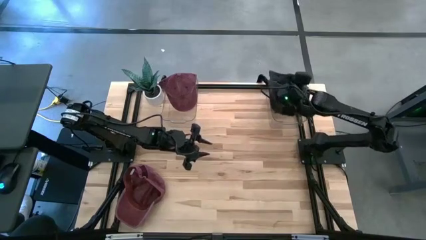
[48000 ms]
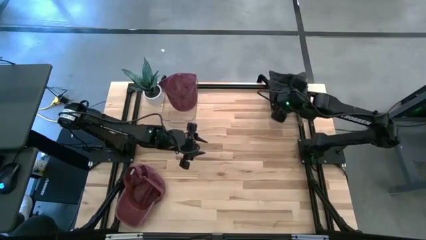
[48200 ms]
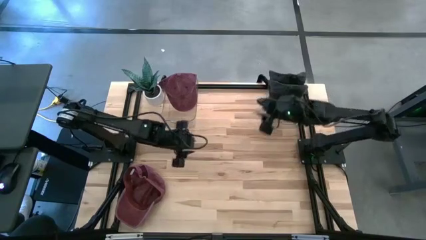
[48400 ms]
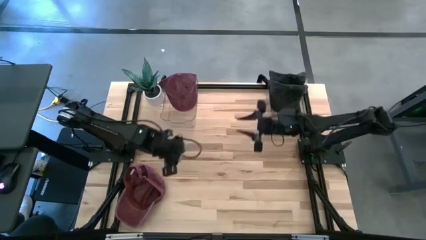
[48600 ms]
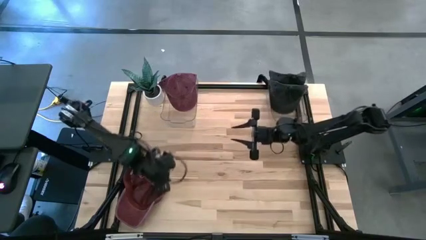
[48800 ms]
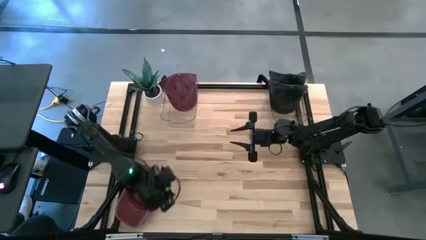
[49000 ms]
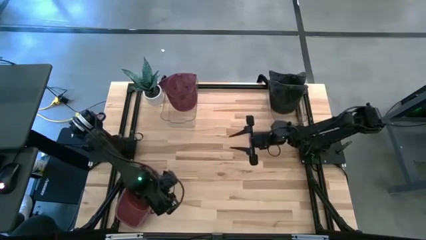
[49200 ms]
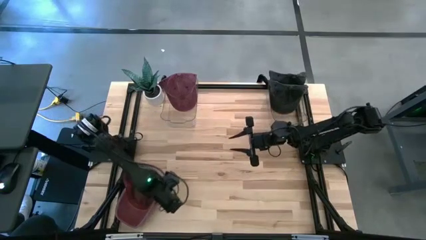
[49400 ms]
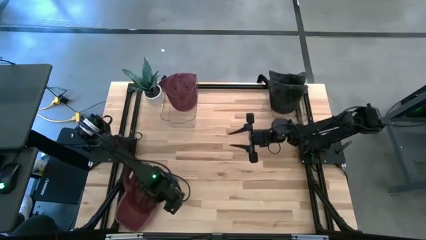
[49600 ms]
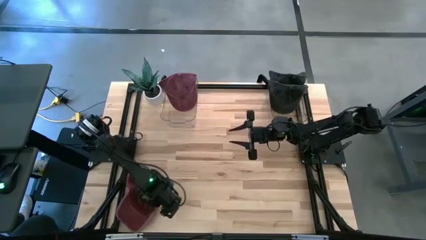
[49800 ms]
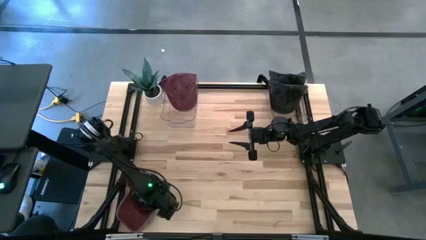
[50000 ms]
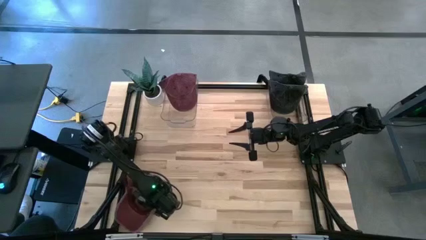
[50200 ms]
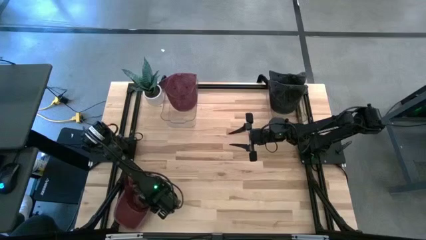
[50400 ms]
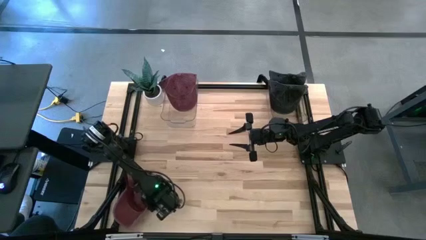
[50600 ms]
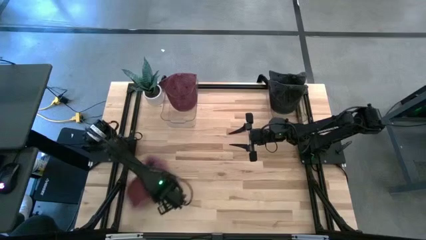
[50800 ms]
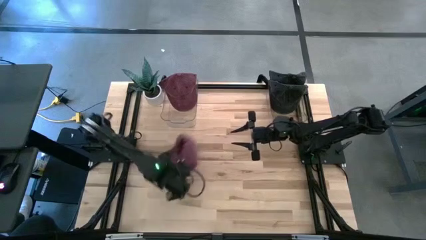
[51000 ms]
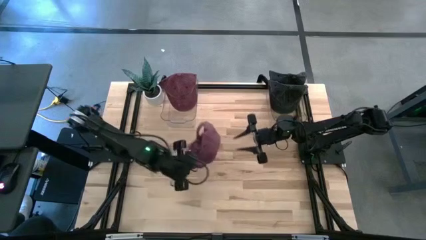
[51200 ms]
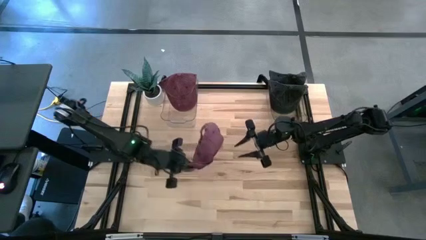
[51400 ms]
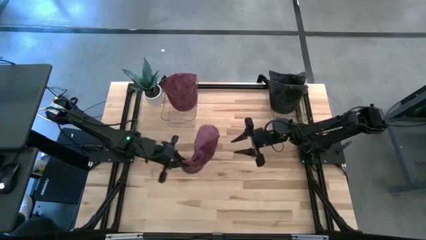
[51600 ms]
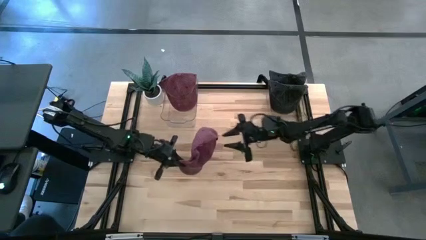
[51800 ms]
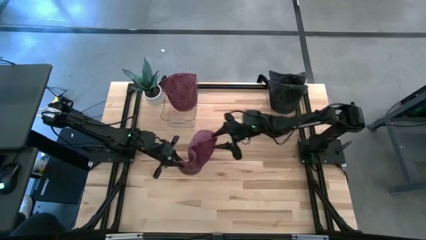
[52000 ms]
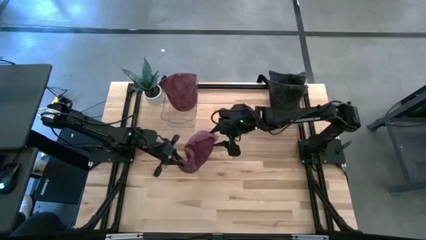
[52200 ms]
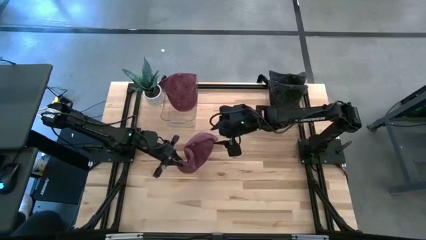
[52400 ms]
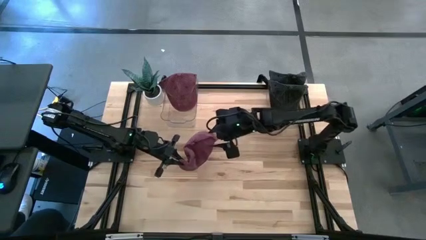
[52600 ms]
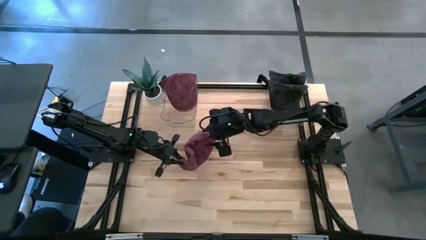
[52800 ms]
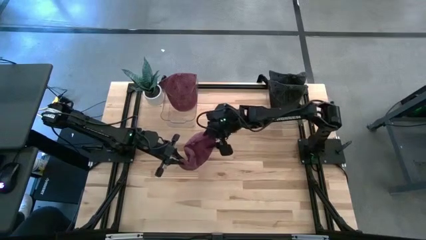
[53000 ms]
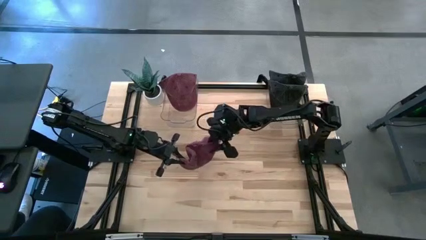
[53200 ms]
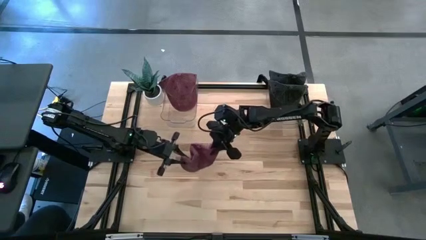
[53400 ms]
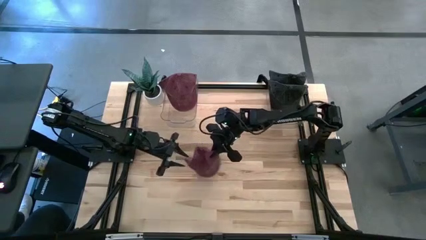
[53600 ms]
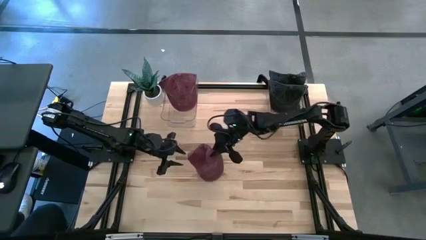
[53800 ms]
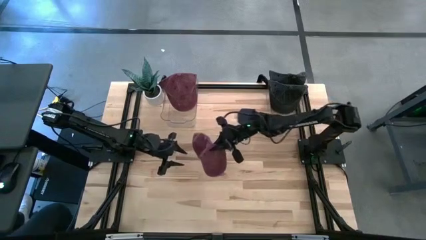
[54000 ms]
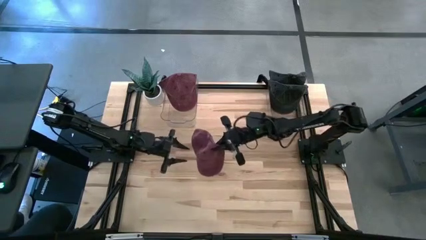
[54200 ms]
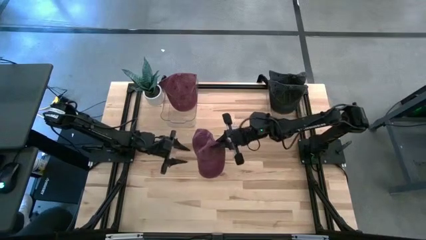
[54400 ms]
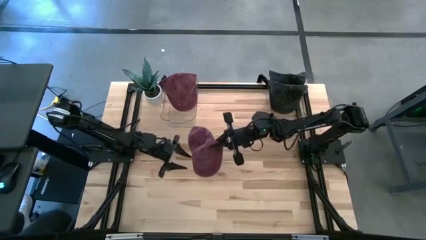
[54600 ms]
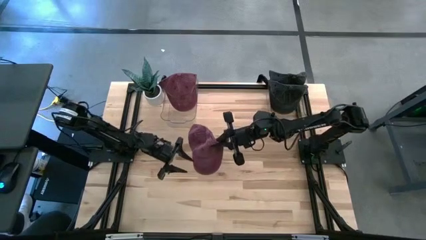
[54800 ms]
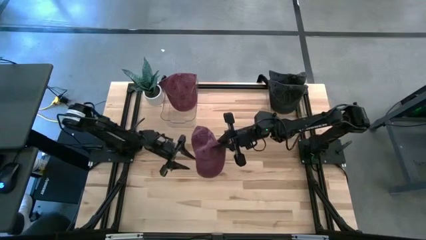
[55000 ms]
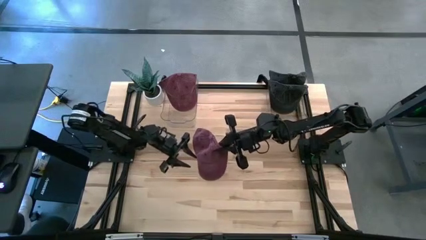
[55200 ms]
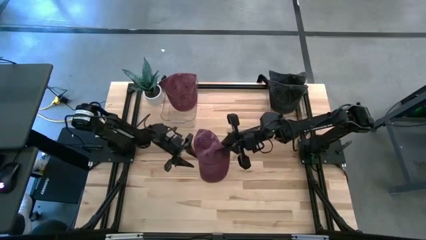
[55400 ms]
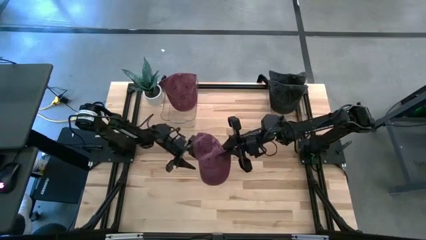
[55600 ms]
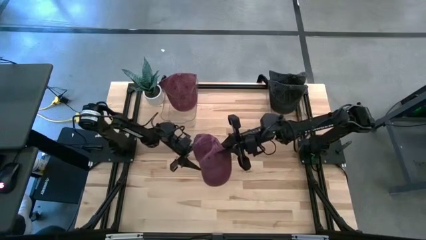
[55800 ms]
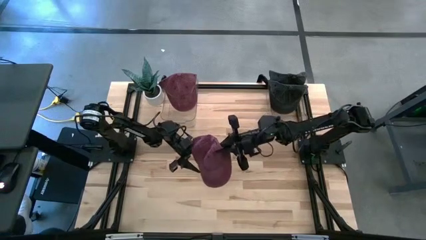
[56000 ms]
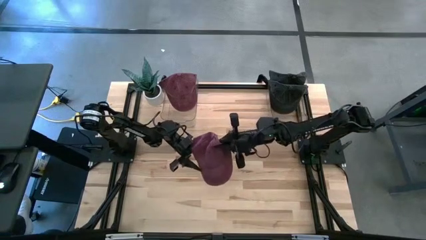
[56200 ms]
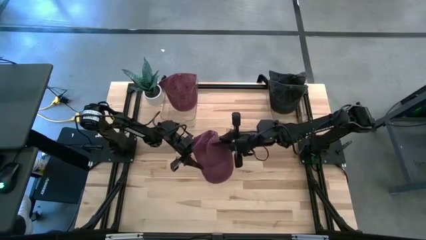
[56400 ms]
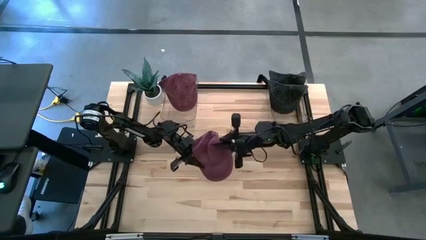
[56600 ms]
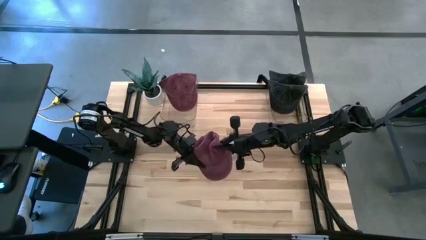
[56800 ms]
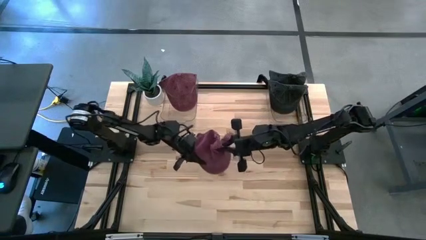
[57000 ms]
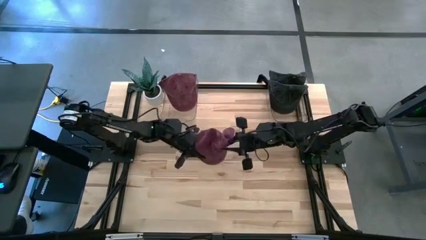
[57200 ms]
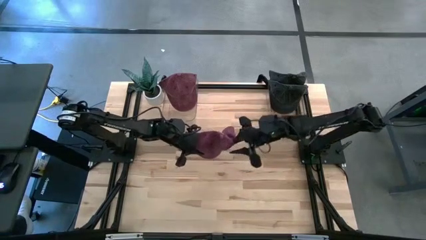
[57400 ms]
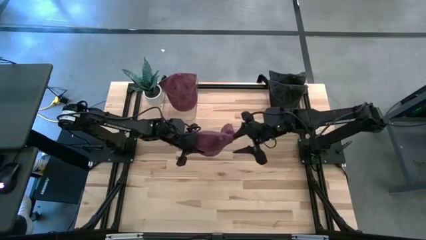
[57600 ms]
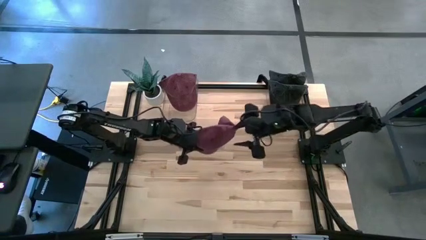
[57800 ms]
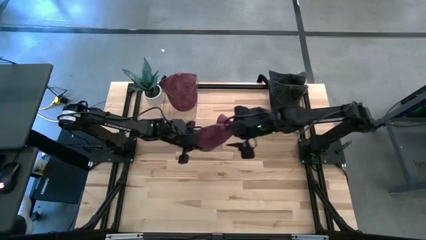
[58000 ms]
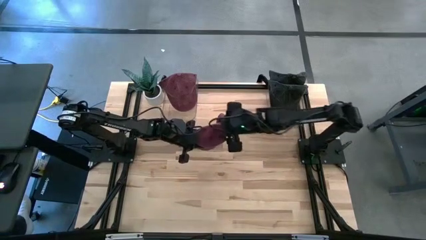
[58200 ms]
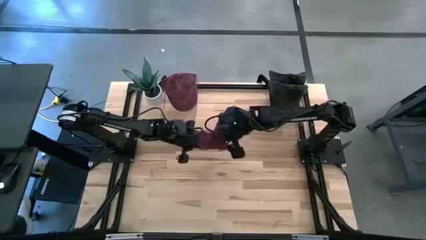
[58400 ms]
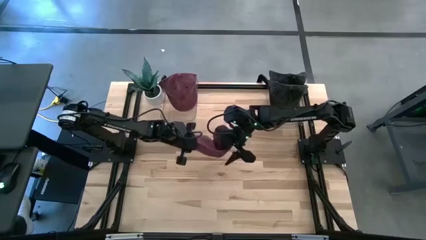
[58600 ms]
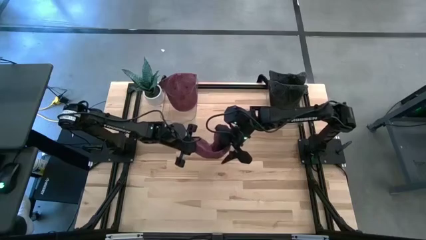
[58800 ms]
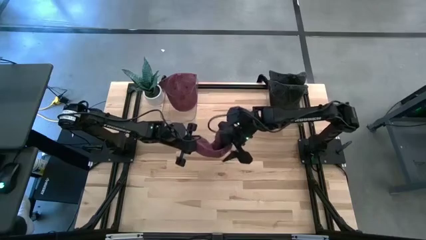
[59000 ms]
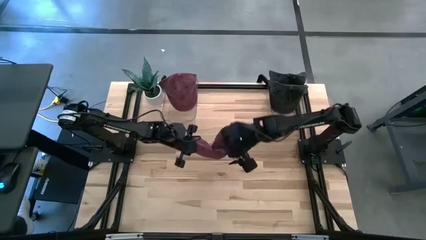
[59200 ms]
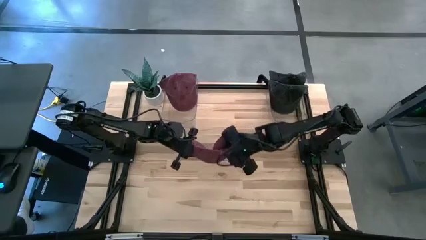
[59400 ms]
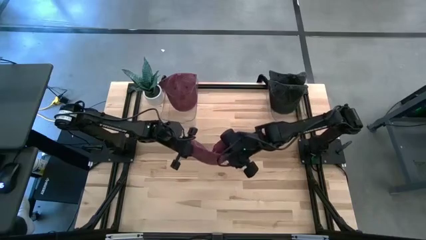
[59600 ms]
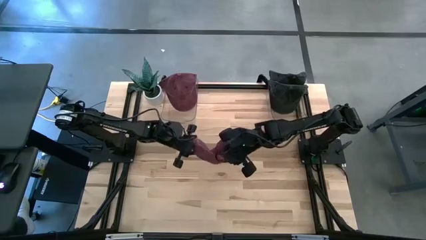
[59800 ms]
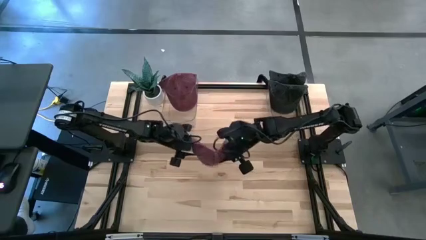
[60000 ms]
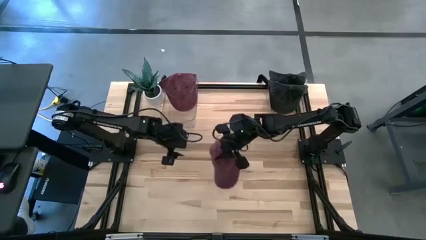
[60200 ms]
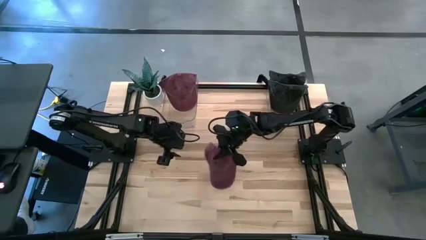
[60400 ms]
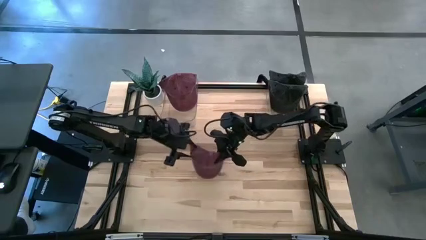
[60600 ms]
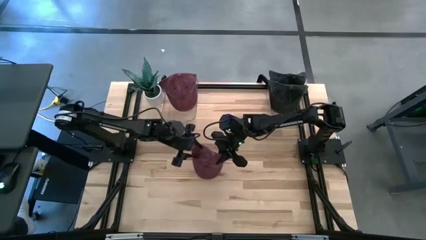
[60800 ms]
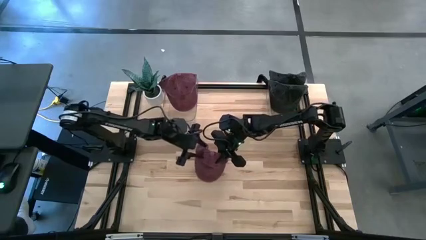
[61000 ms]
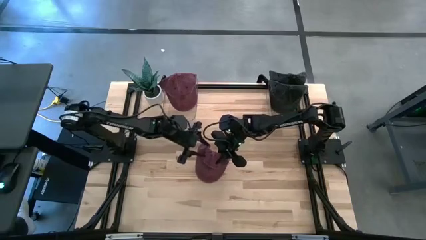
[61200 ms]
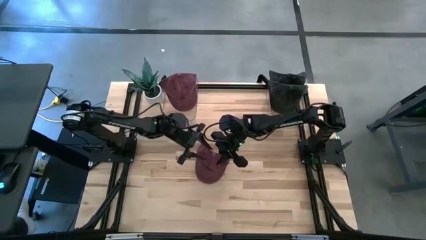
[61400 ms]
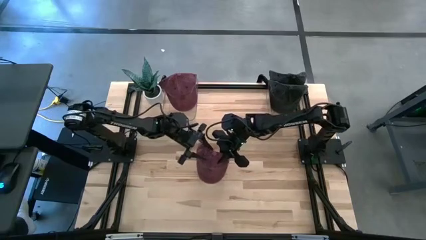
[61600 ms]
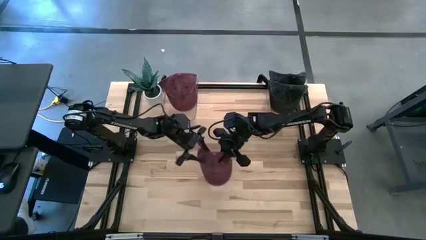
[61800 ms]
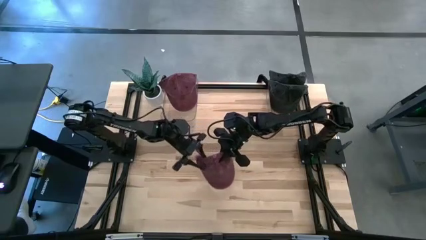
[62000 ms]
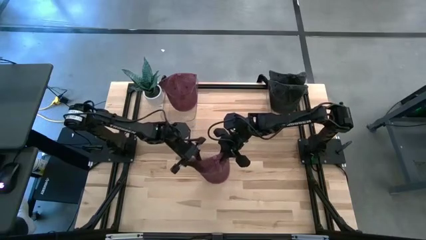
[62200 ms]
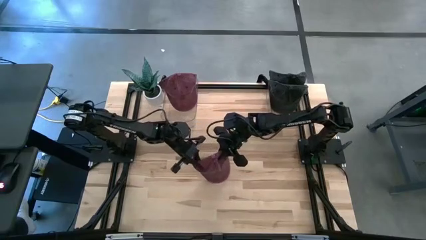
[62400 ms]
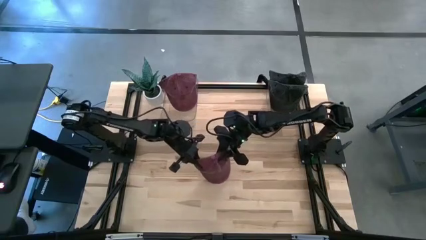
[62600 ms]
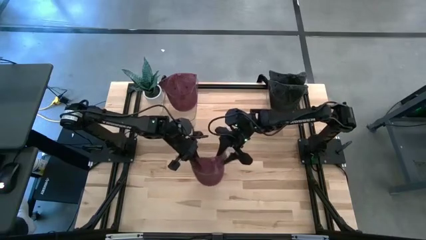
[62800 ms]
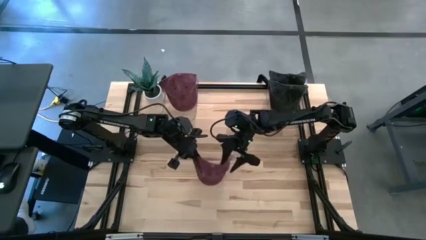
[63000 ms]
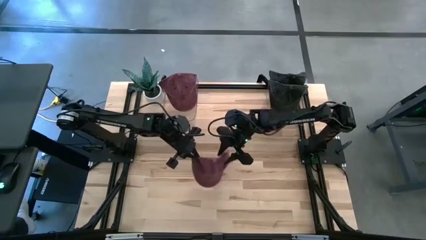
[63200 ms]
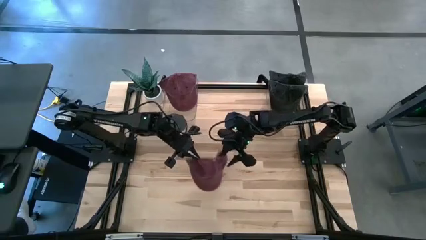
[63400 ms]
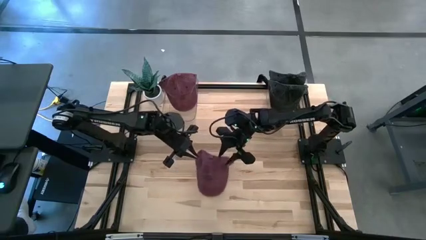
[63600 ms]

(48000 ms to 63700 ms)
Task: Pick & Place hat
Put the red cap into the left transparent bin
